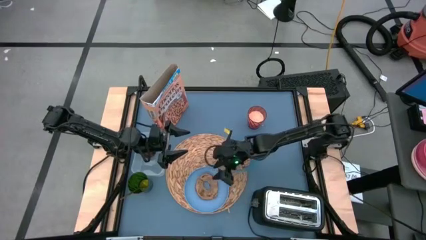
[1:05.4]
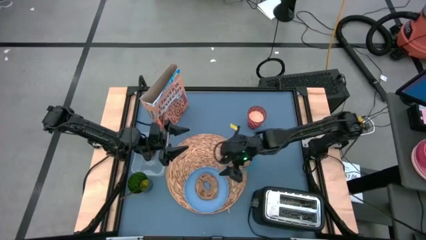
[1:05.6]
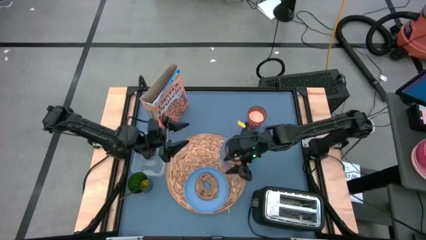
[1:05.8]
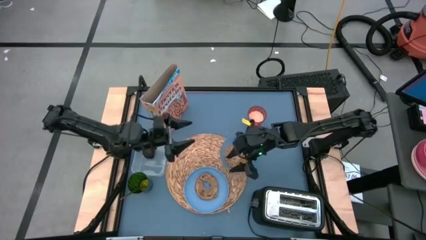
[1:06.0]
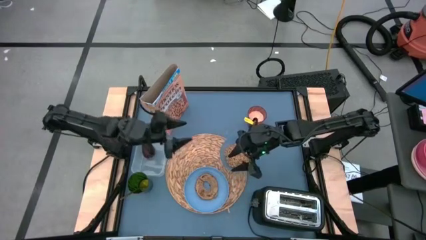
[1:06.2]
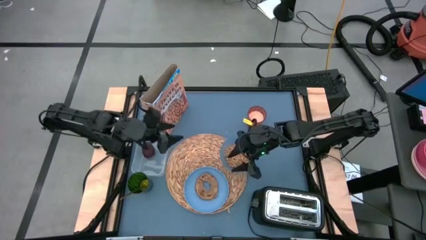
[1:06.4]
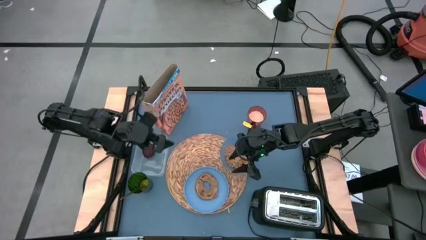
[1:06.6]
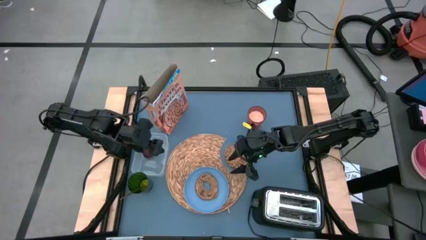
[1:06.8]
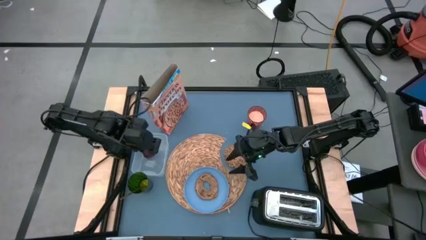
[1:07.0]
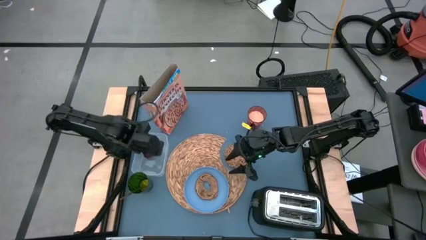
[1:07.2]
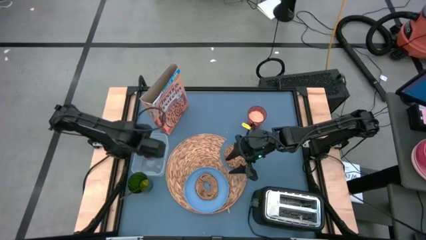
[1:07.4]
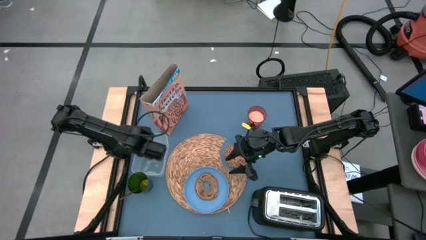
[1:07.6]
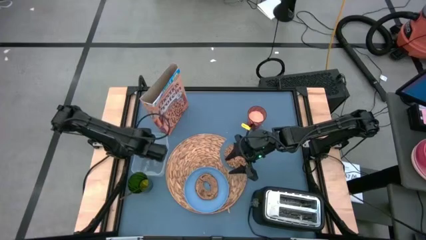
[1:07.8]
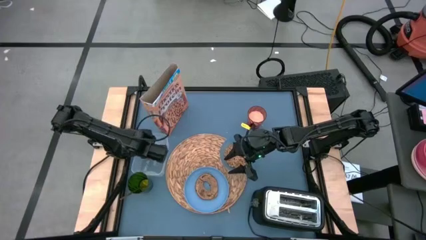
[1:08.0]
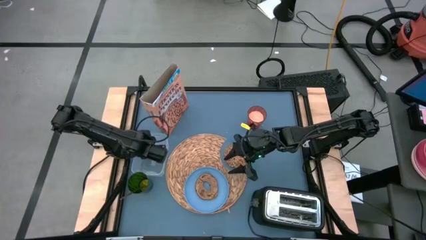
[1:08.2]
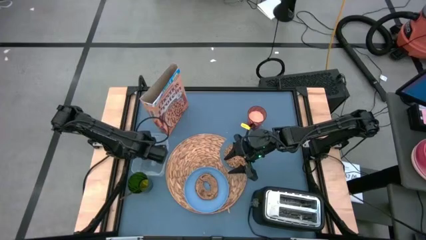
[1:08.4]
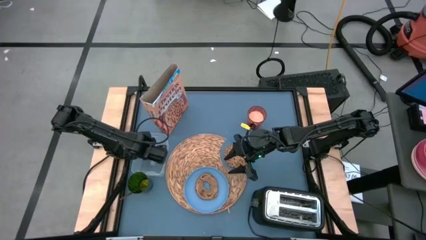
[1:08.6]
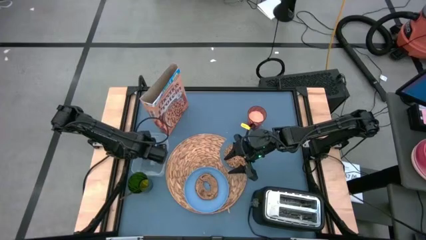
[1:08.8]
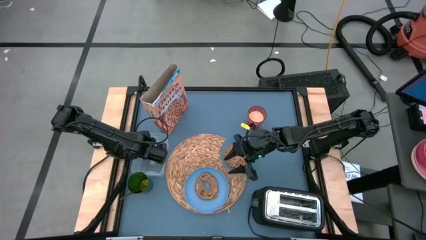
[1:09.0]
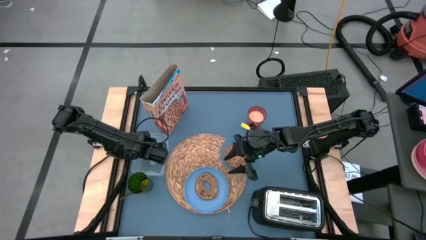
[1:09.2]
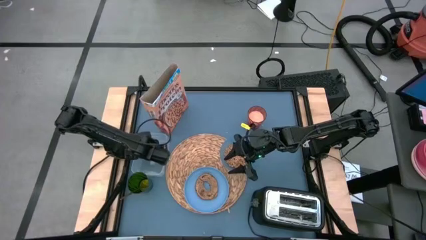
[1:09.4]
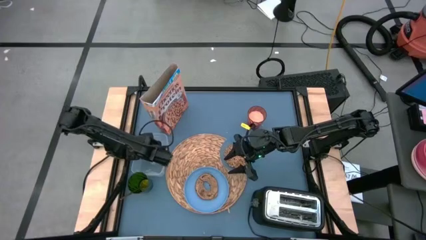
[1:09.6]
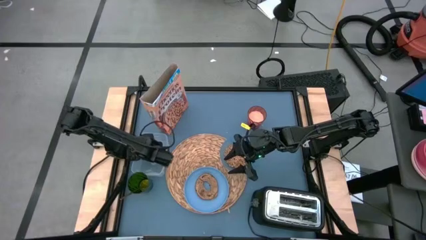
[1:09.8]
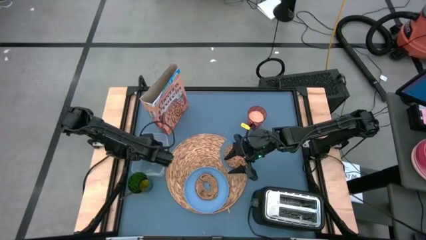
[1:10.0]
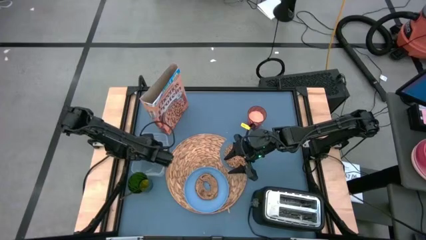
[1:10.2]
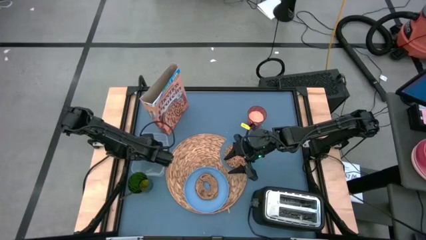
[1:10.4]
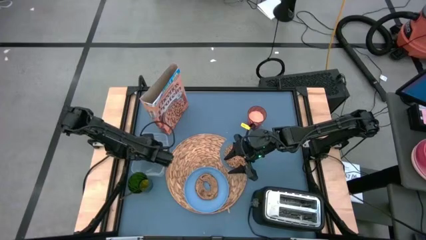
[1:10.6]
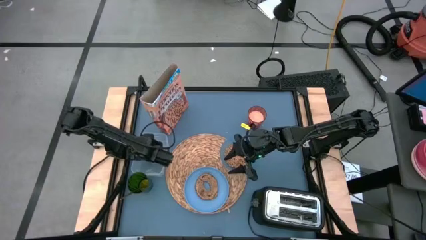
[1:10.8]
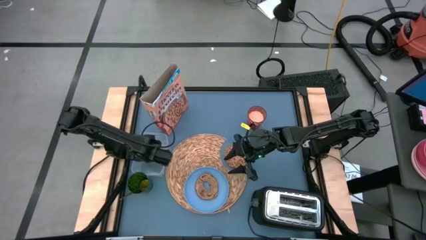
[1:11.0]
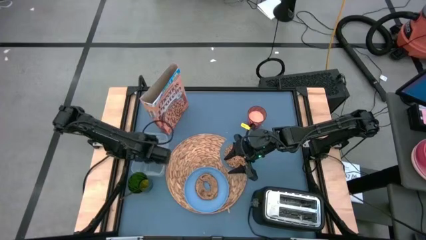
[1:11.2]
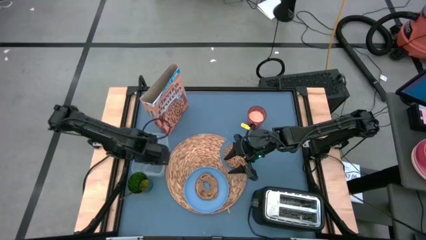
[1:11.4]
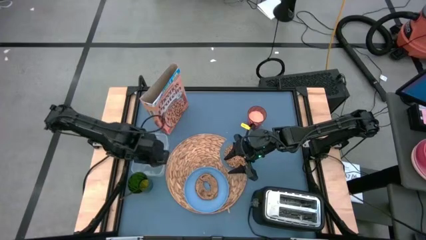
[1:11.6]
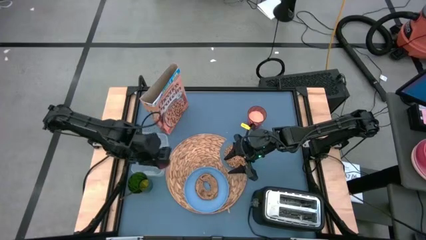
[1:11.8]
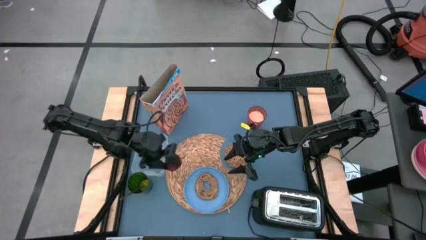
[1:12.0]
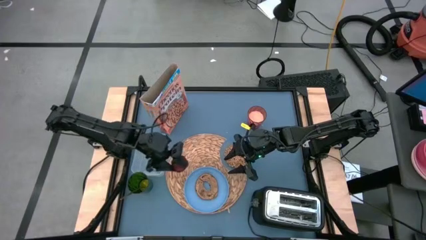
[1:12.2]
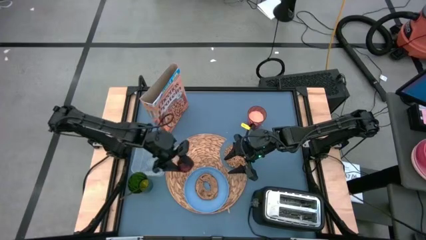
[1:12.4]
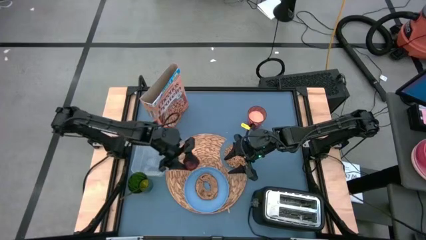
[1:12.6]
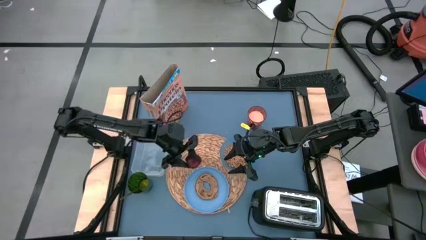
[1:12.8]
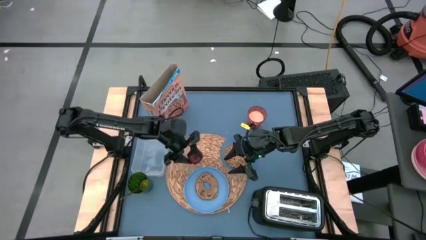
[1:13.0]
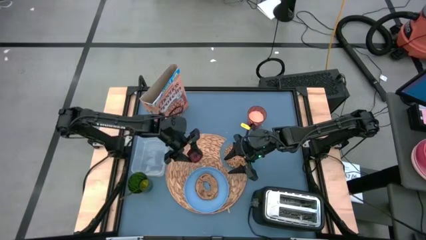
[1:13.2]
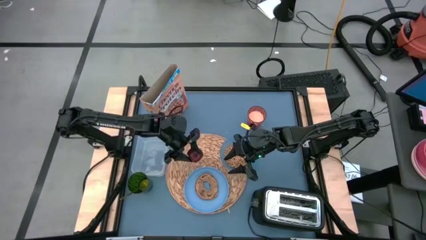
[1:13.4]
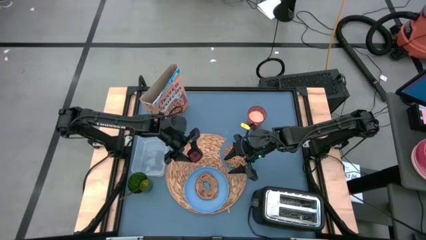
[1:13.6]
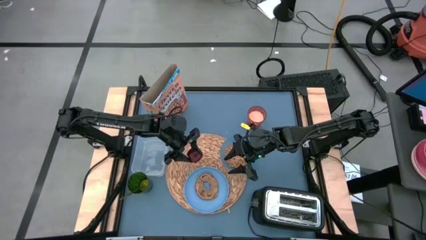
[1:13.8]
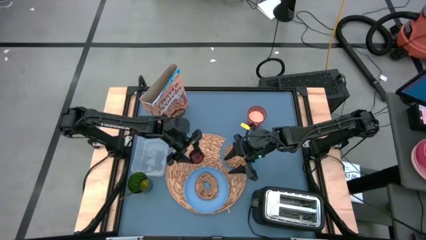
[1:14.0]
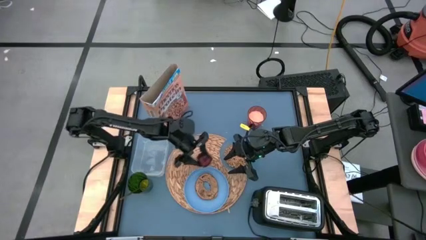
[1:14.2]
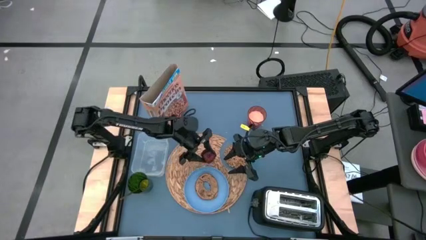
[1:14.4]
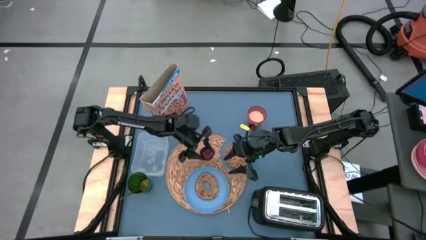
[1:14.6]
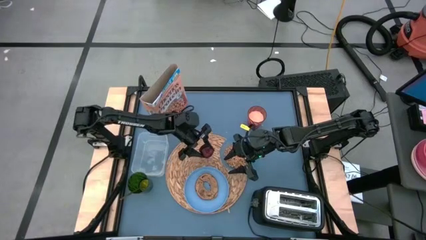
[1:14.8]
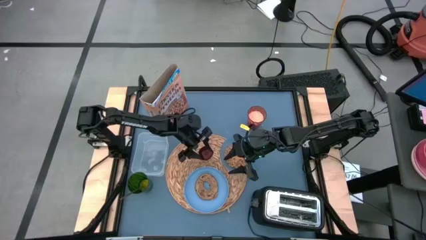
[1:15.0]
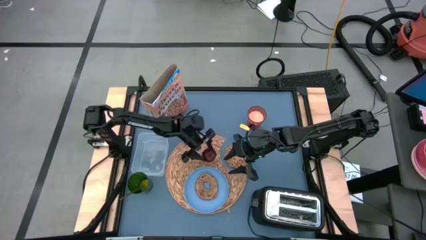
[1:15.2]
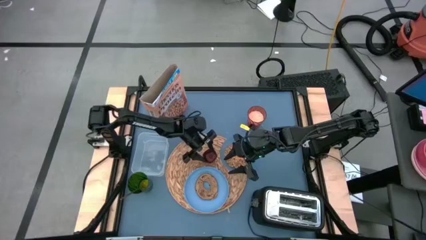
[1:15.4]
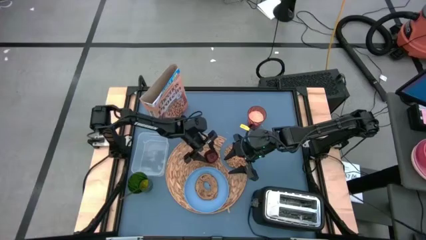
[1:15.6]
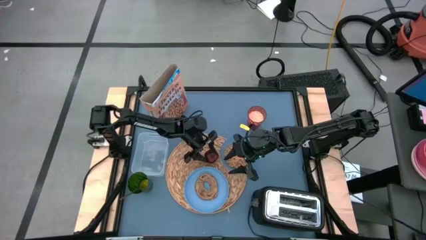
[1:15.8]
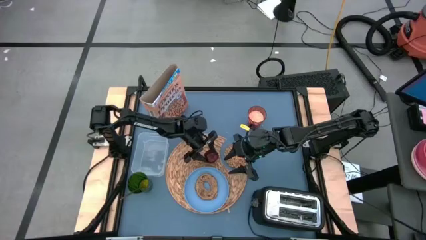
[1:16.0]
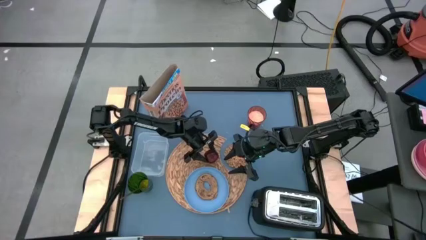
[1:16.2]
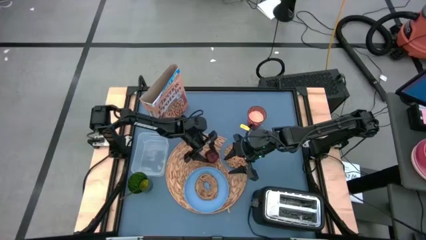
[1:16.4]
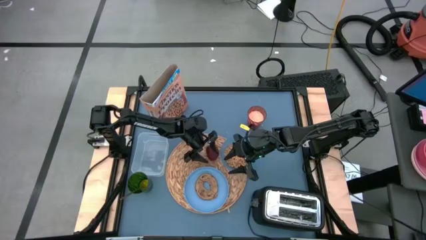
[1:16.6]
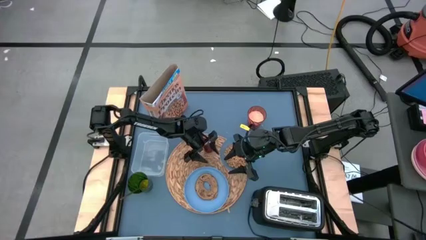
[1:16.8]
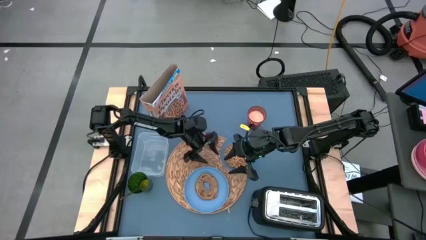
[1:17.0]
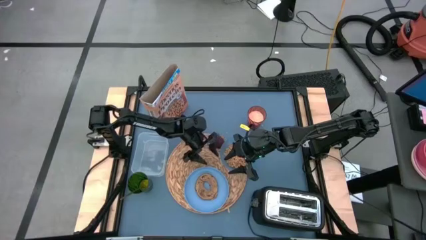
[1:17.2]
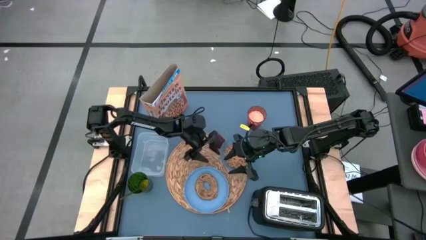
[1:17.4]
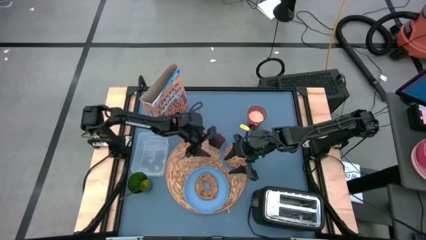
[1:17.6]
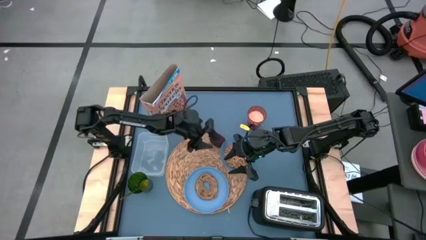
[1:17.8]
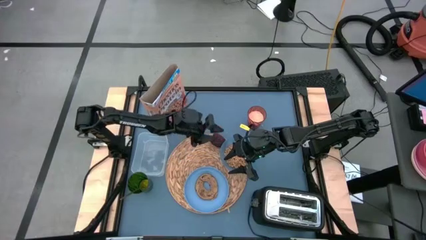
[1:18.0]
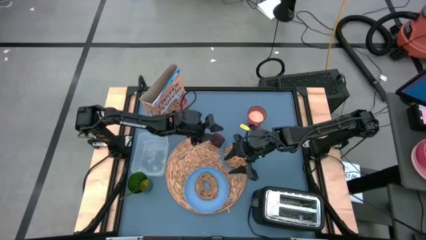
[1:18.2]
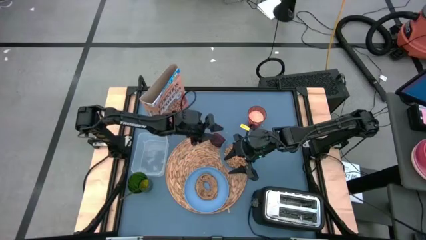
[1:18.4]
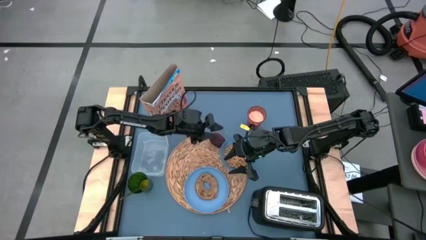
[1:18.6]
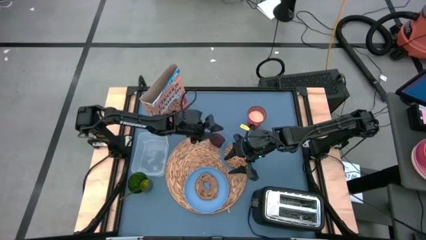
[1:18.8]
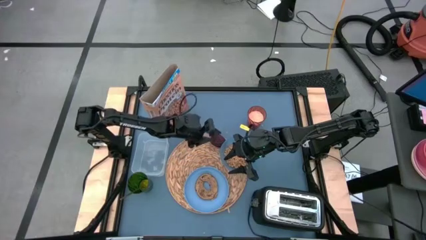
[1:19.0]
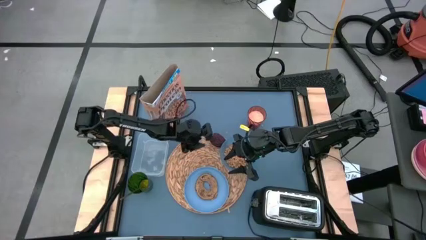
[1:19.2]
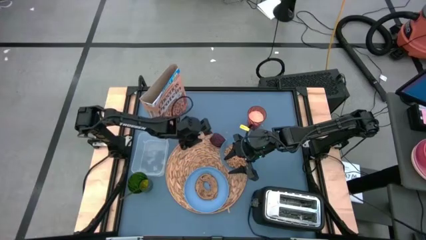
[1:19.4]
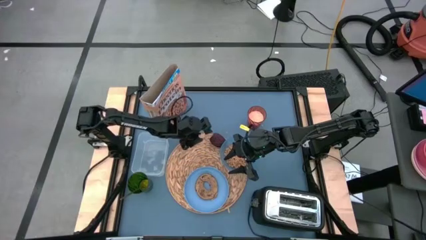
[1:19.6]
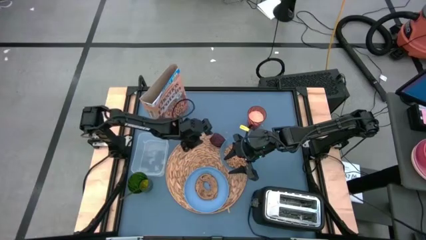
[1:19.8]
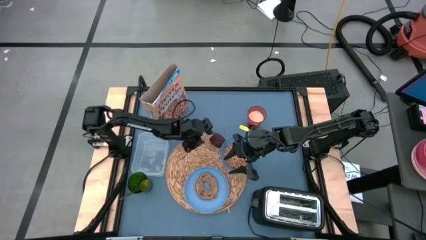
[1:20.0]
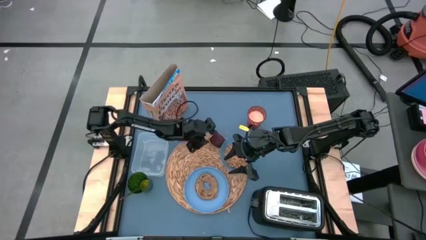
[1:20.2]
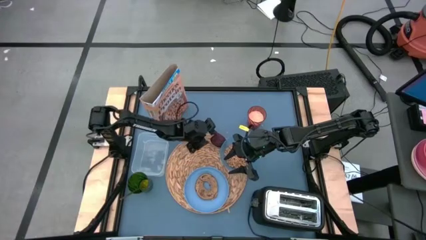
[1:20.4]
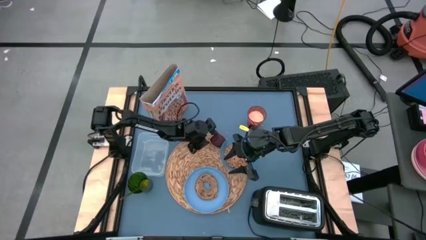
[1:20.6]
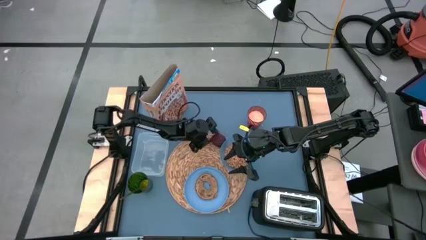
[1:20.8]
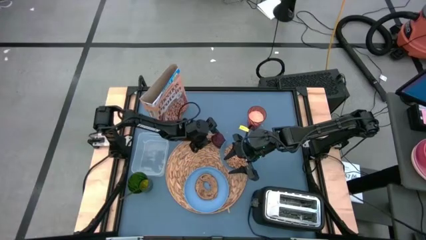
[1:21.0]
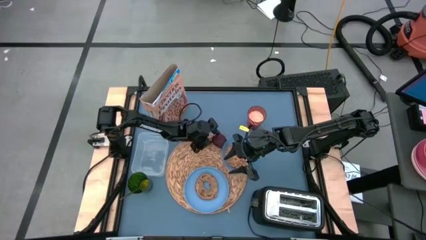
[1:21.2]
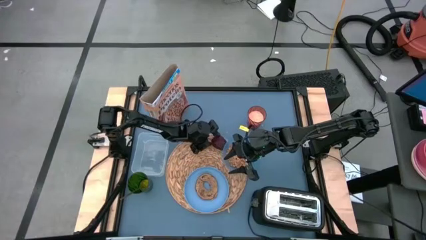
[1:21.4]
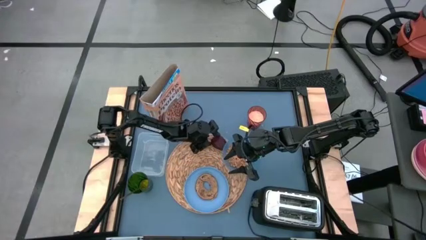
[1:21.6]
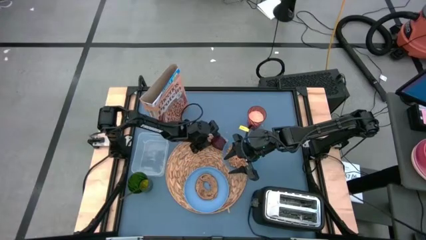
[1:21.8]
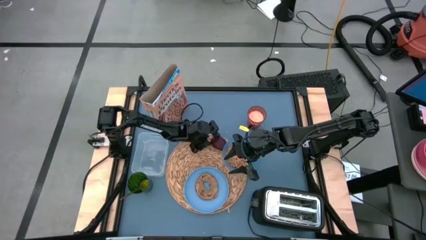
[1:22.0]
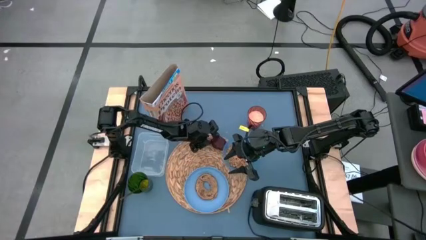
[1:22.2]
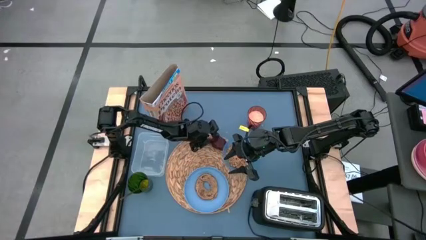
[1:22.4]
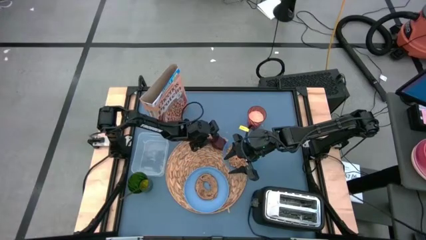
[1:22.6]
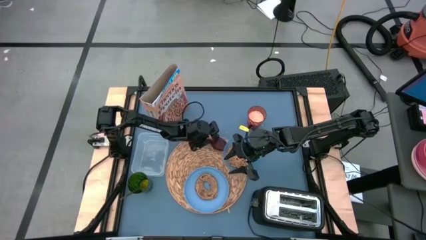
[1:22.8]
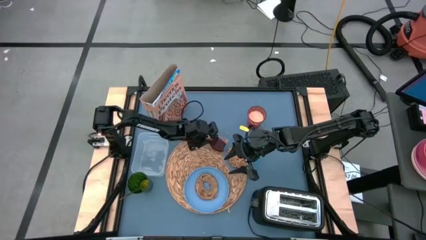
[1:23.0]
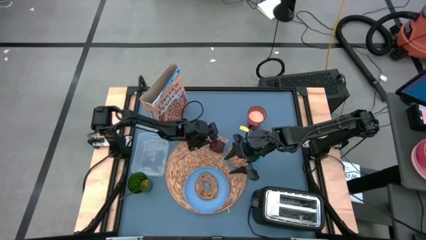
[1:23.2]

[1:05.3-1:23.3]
Task: Arrange a breakfast setting
Put the red apple on the brown tablemat
